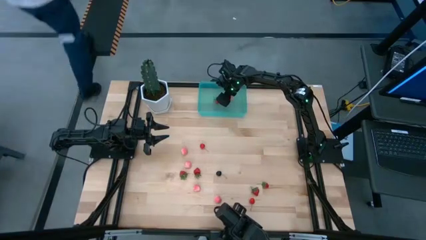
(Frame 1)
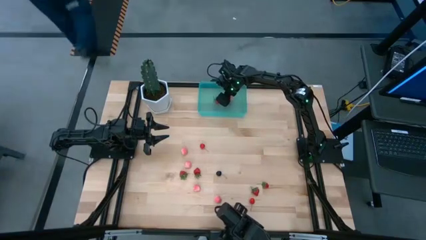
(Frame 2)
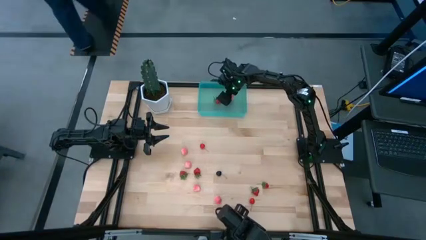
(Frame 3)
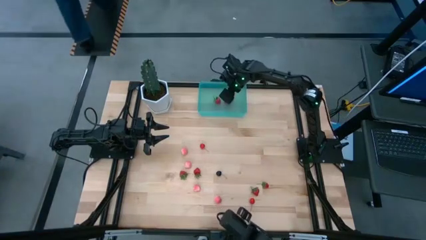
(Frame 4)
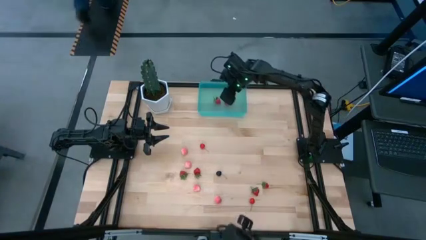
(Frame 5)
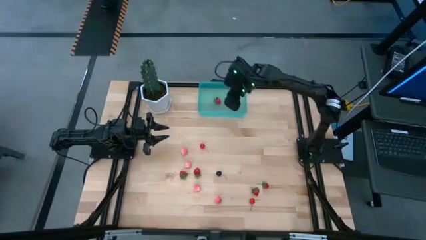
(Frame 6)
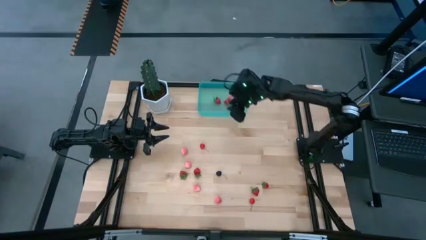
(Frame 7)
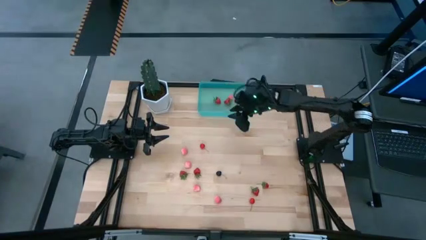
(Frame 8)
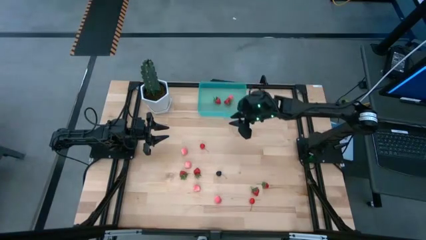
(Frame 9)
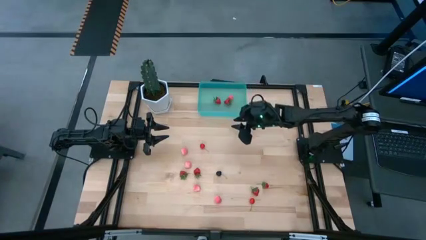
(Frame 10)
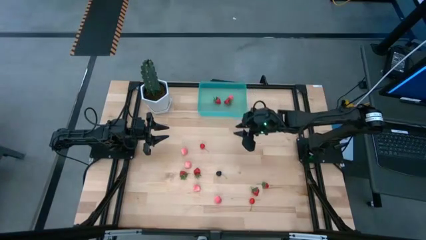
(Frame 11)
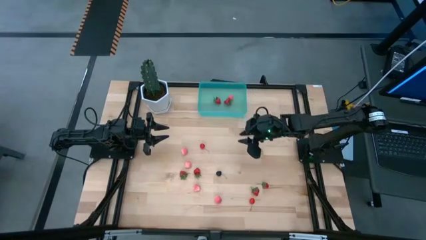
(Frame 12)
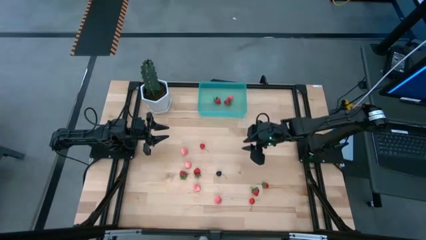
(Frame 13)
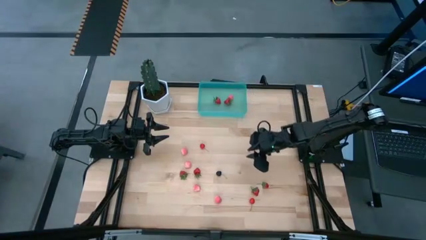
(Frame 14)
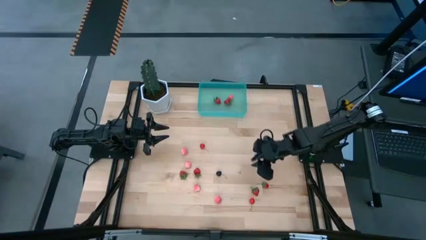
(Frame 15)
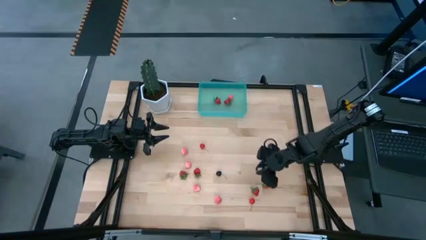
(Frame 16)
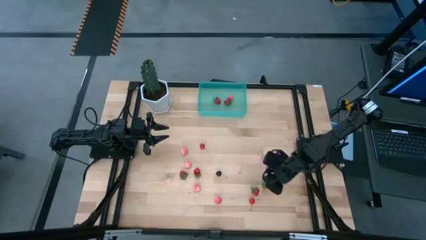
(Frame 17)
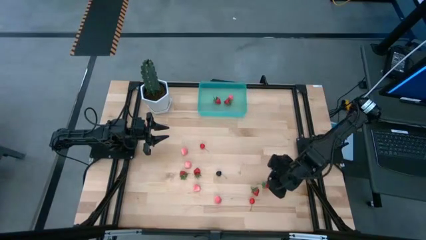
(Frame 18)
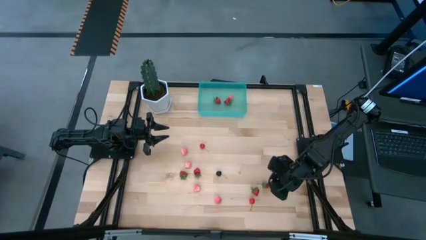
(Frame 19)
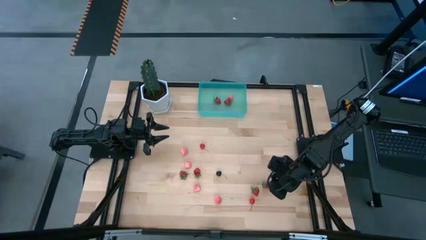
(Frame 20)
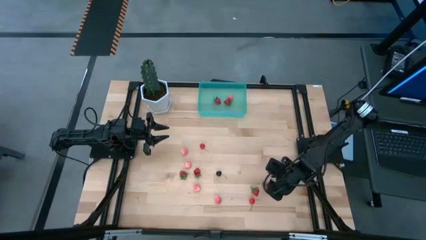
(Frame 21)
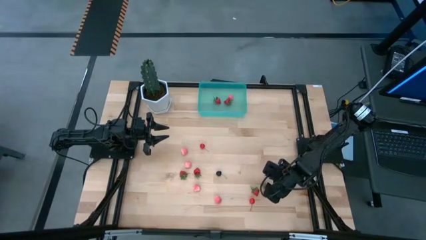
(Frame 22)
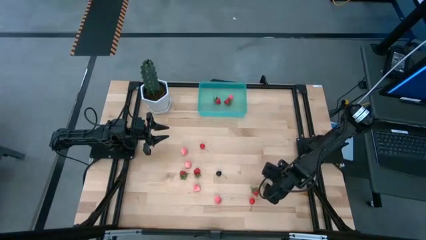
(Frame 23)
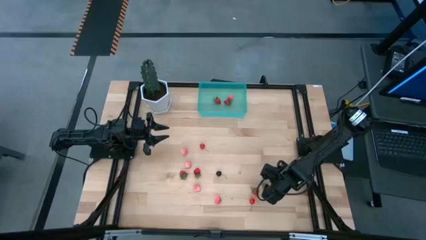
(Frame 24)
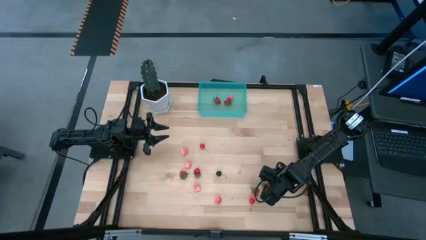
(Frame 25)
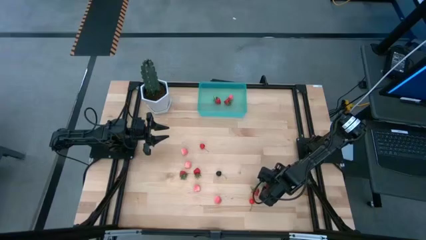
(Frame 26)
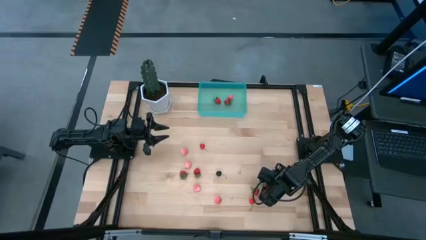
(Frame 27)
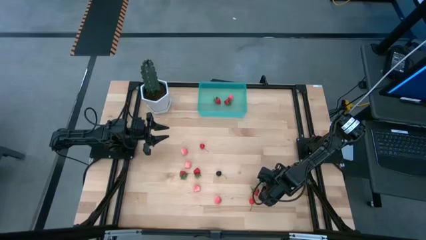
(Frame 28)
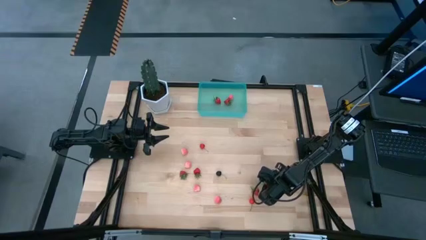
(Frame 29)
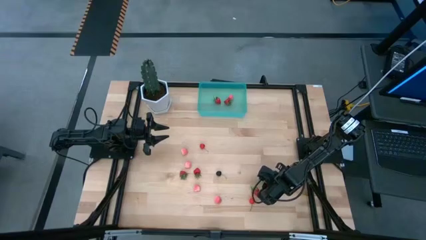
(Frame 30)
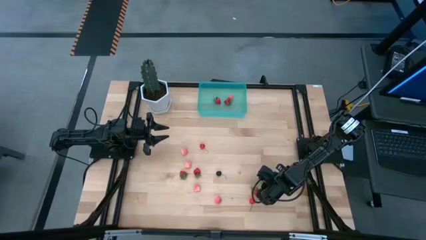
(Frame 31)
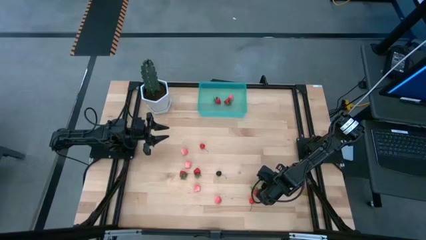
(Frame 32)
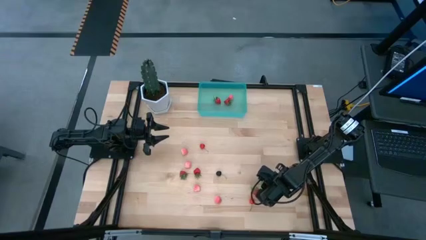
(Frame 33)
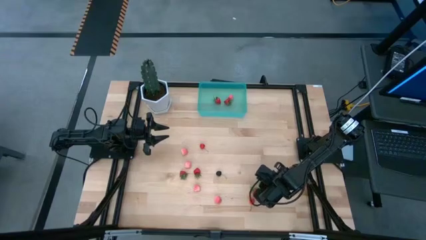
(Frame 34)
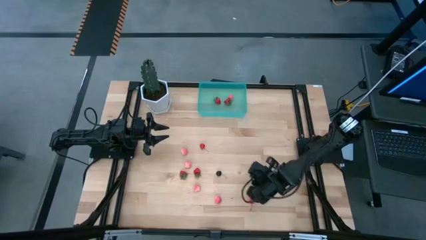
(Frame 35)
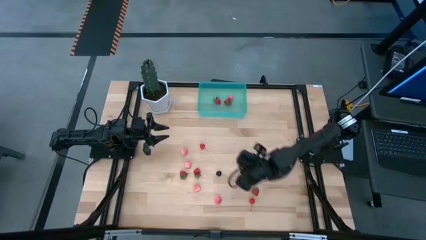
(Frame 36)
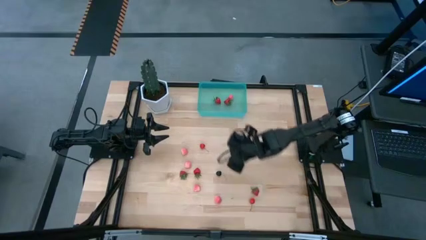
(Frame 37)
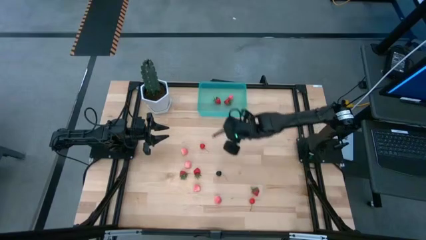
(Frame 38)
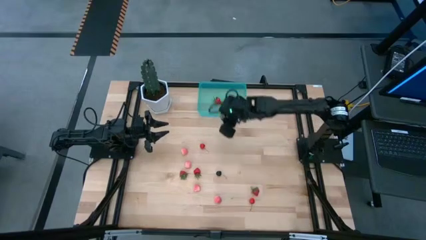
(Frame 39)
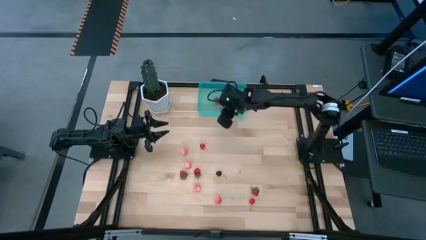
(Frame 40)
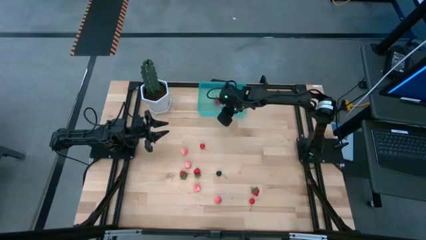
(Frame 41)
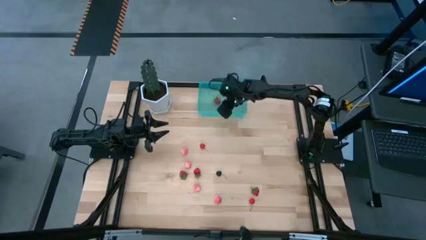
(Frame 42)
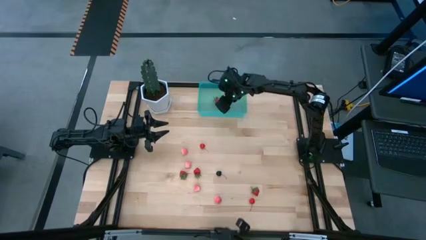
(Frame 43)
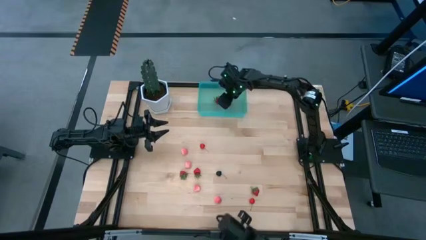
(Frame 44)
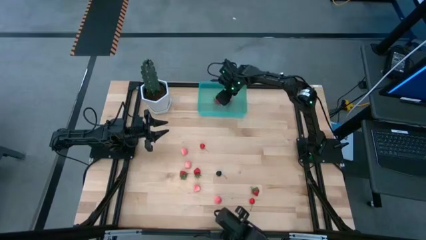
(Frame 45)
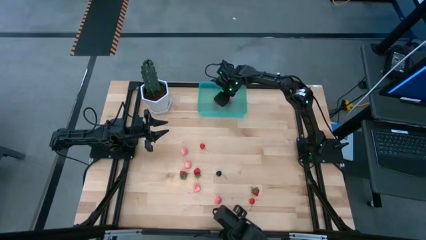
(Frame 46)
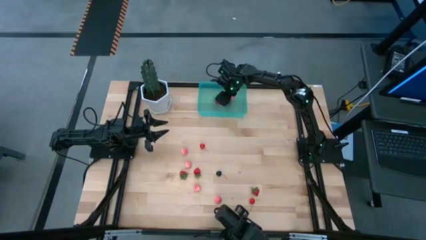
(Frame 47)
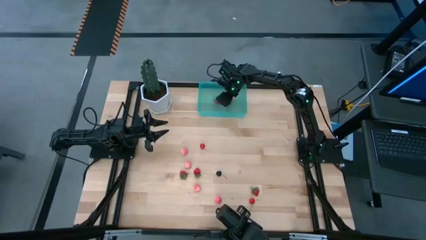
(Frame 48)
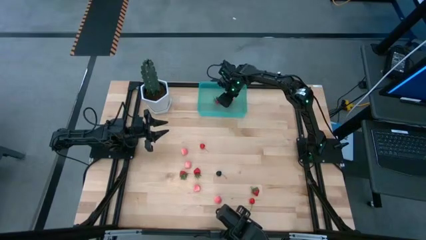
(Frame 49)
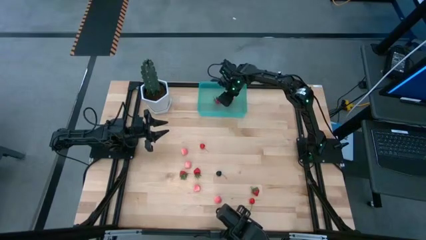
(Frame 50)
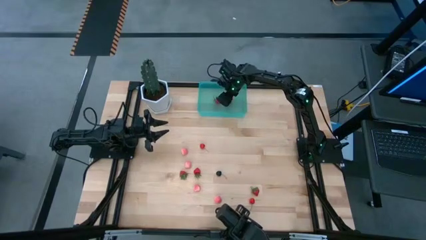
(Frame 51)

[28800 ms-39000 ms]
Task: Pick and placing Produce into tupperware
Put the strawberry into the container

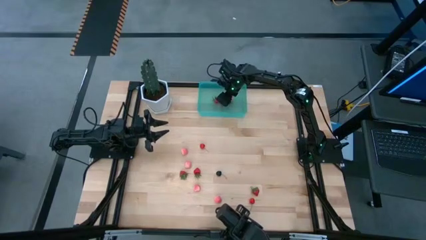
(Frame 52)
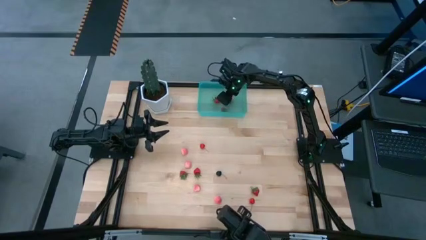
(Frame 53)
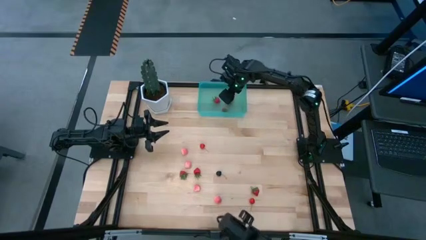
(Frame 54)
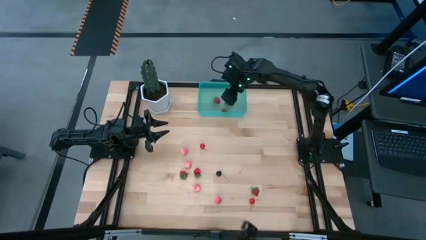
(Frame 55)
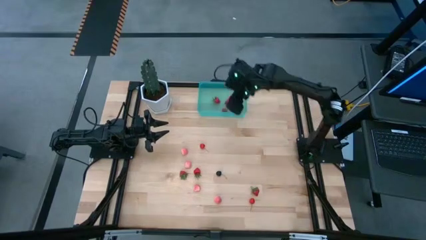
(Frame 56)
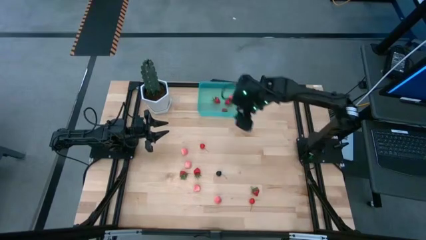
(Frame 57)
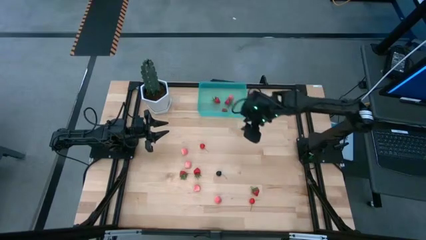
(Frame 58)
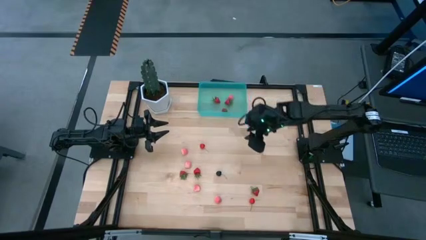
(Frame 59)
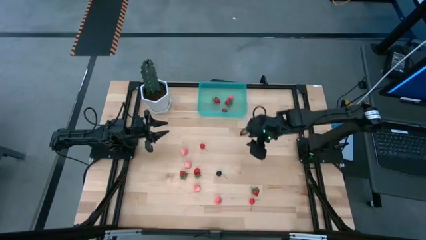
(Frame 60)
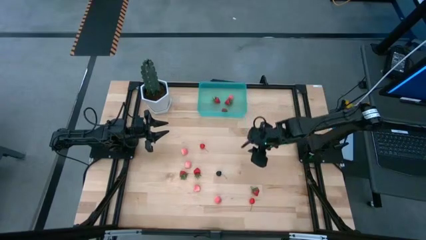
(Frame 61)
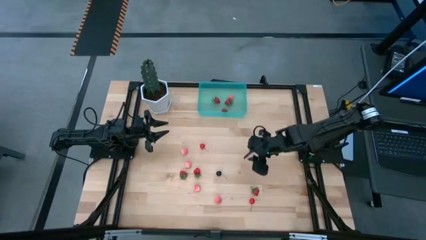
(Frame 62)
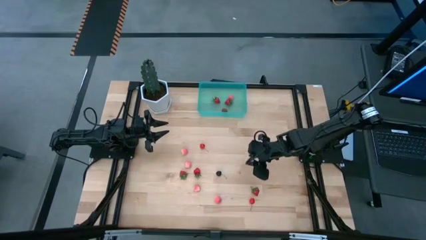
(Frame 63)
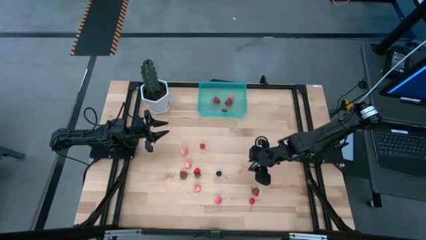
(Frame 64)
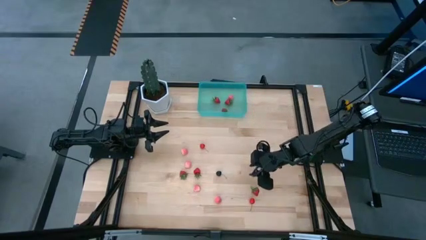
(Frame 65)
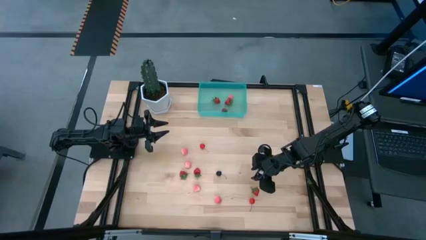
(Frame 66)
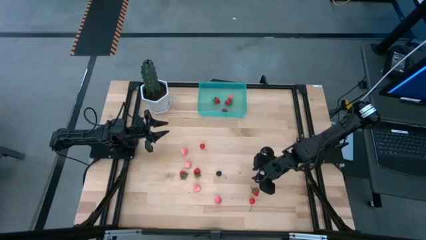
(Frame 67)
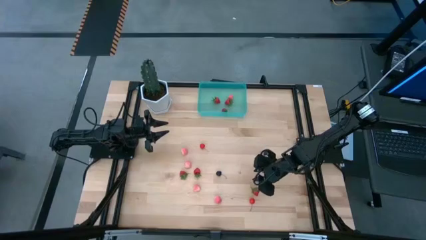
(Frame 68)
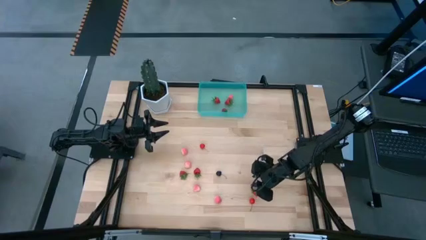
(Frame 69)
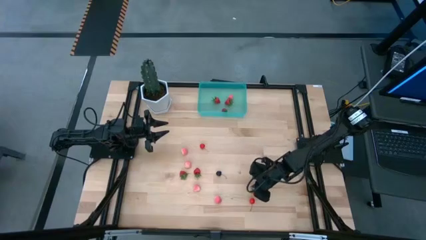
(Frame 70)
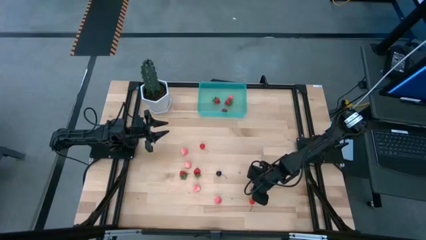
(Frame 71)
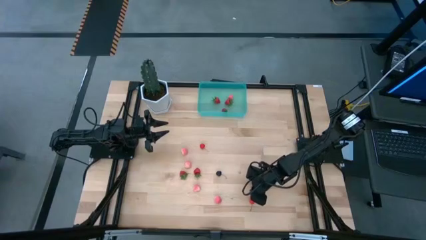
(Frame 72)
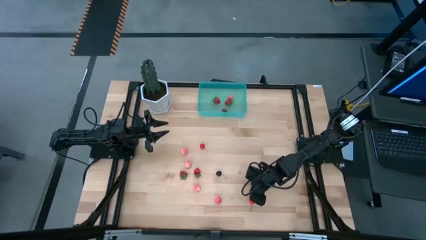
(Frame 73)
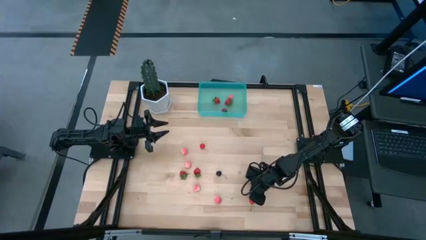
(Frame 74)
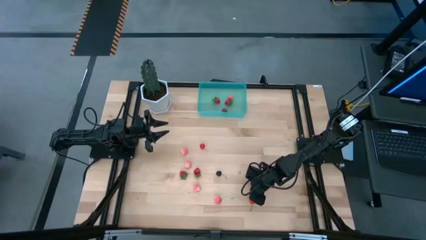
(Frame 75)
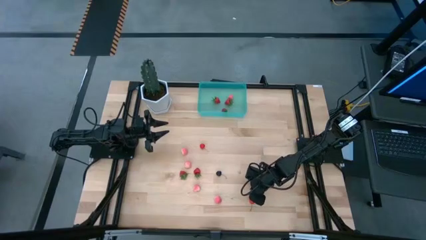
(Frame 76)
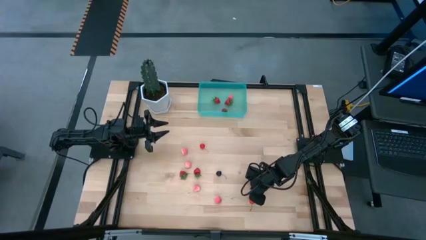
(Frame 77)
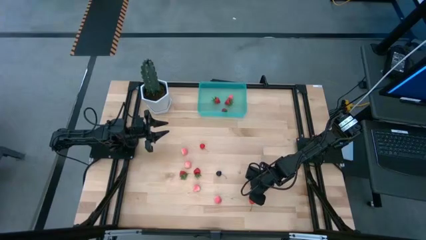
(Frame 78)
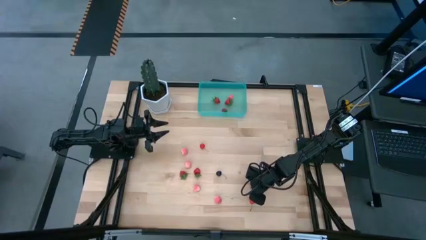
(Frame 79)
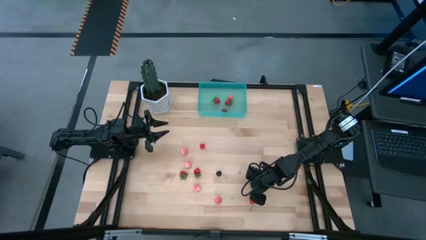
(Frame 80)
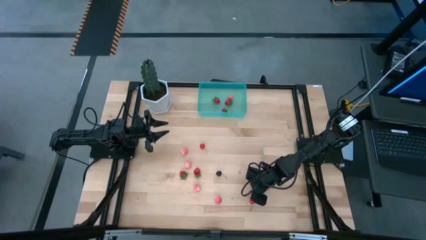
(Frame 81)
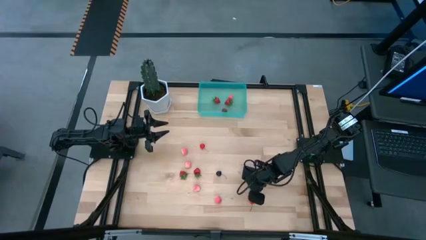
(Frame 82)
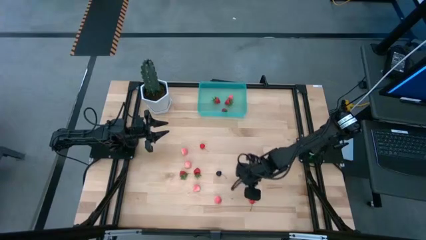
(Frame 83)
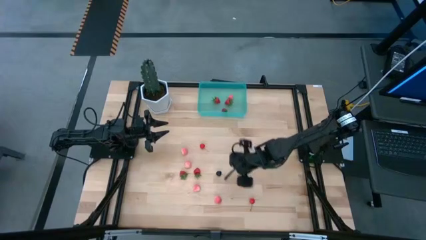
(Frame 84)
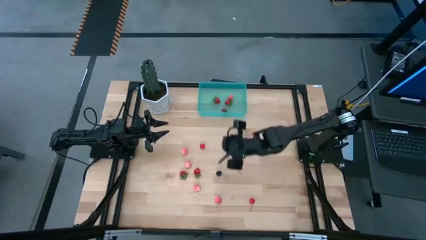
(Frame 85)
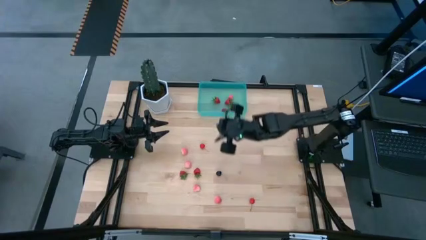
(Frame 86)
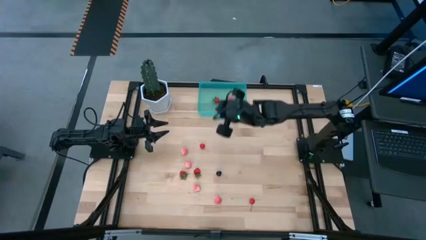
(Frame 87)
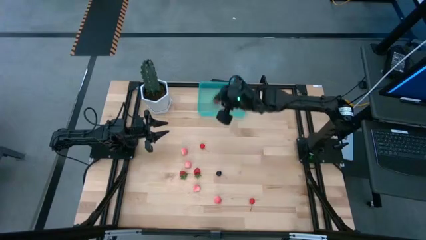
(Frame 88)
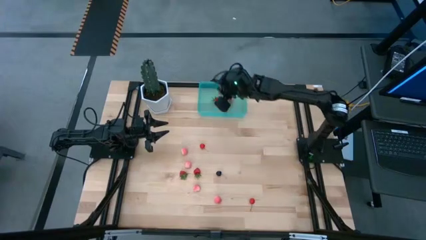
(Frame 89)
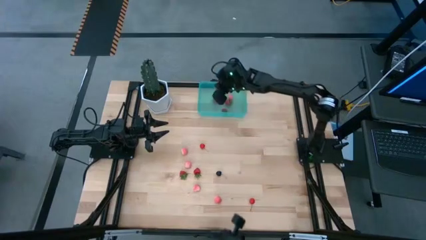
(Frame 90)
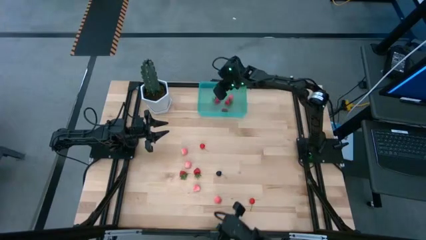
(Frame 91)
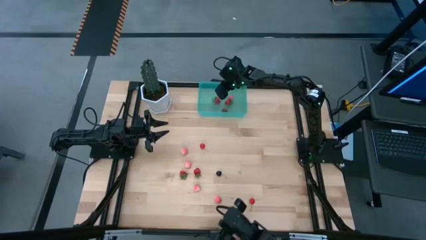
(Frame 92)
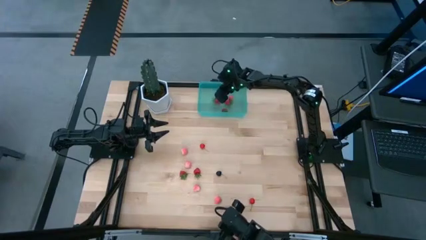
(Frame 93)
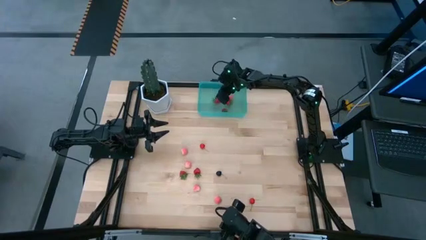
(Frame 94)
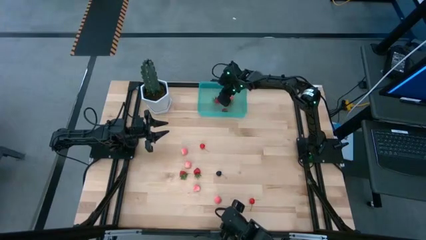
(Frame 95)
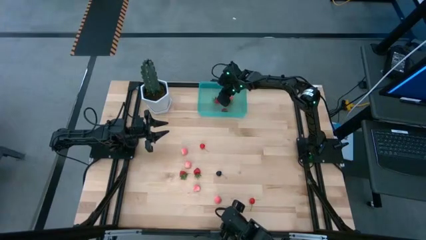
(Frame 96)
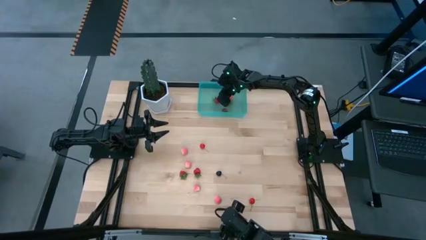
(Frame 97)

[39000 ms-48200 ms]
Put the strawberry into the container
